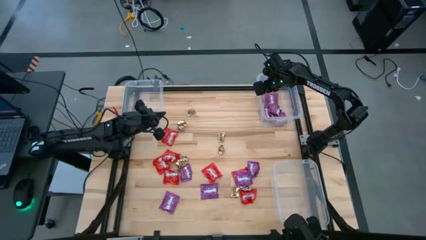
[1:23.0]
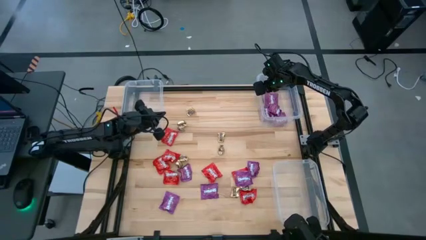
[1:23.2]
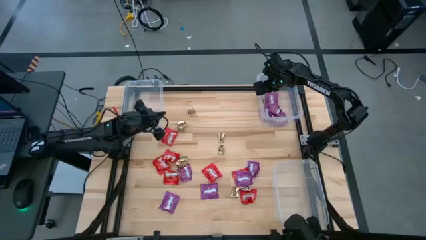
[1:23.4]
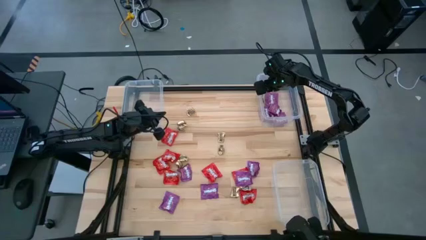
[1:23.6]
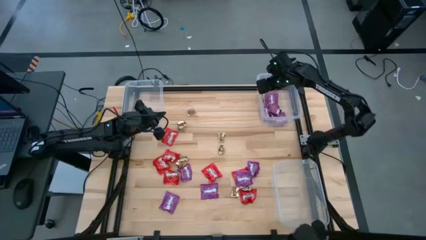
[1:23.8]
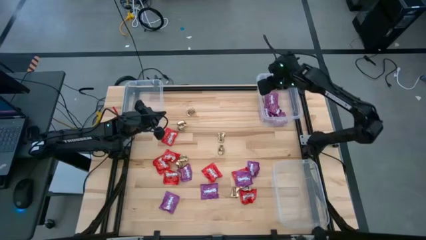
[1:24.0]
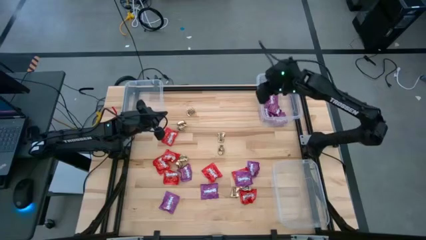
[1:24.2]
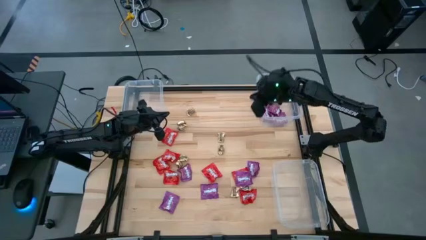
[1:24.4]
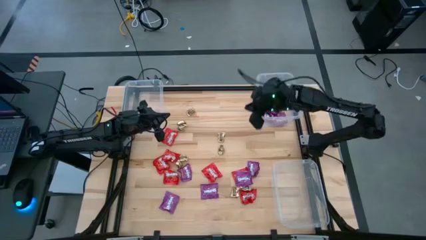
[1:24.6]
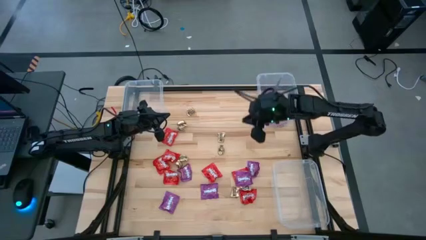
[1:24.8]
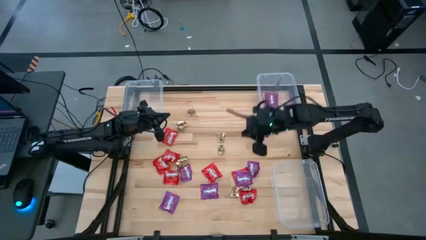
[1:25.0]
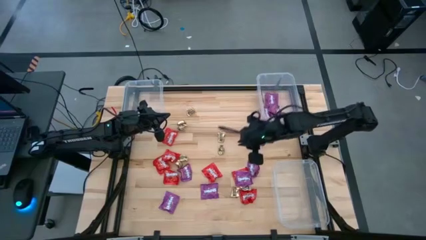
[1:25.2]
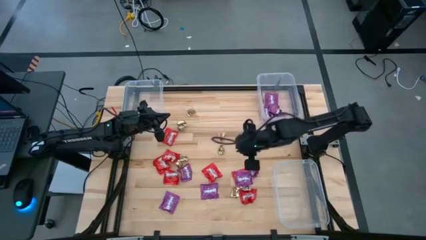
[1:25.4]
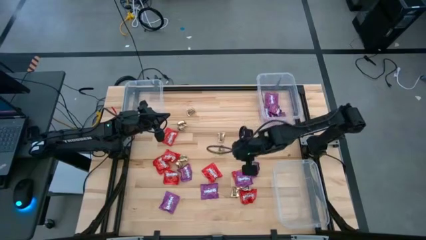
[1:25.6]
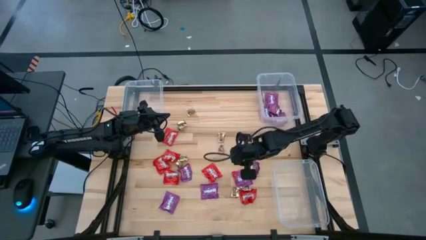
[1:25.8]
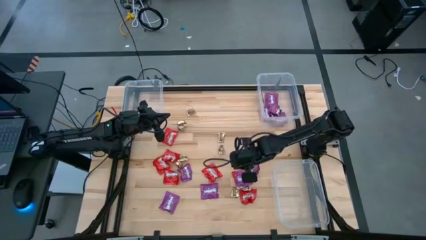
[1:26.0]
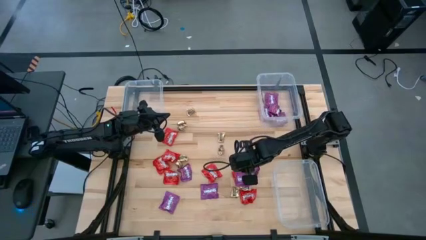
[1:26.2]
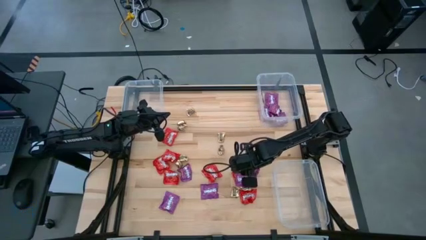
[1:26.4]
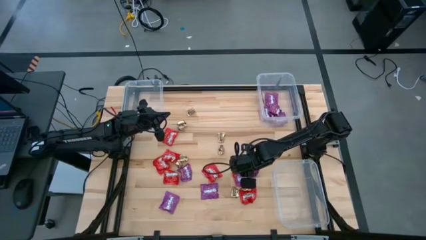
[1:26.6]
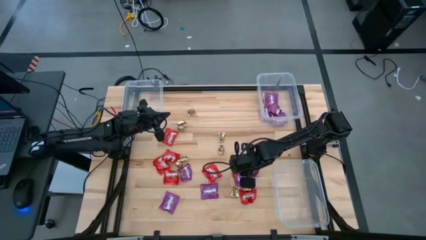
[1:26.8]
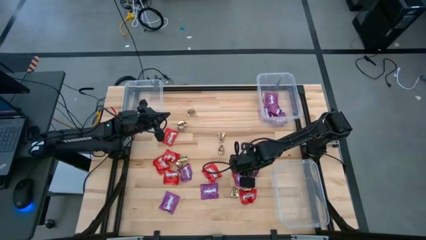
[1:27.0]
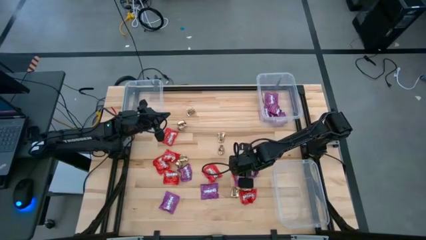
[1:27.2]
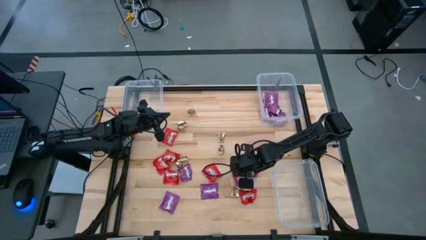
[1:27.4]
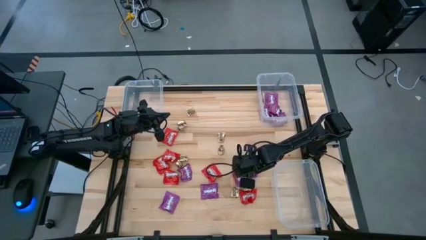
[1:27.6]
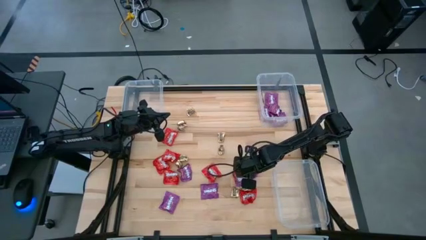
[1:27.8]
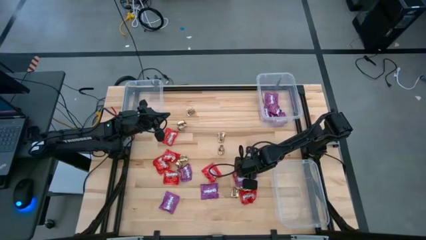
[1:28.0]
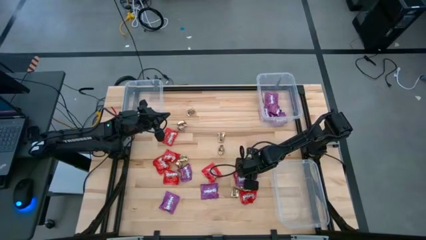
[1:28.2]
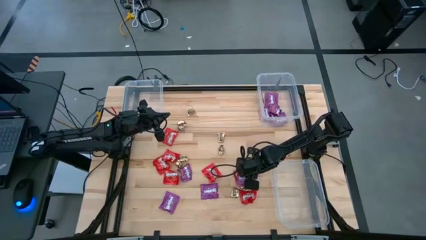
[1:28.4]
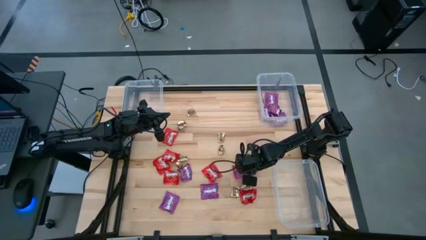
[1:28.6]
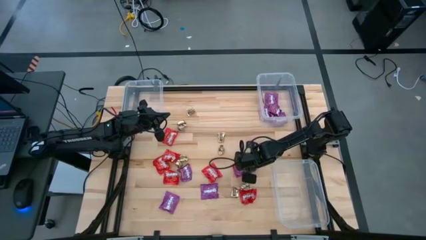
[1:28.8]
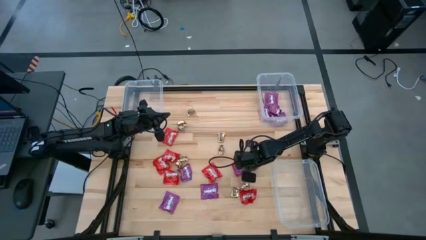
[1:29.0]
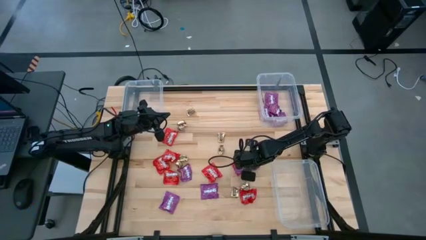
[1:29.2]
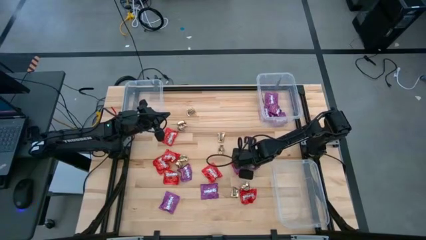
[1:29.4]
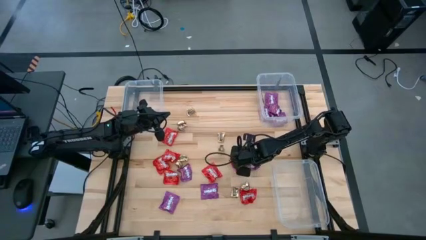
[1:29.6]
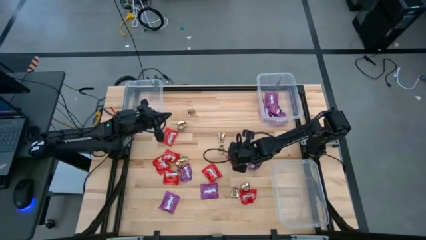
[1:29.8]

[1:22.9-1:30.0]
Task: Sort candy
Put the purple candy into the top right transparent bin

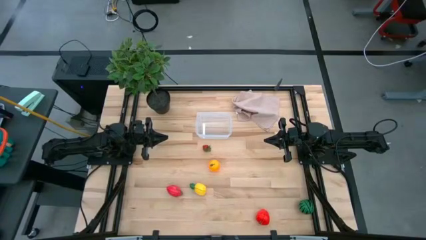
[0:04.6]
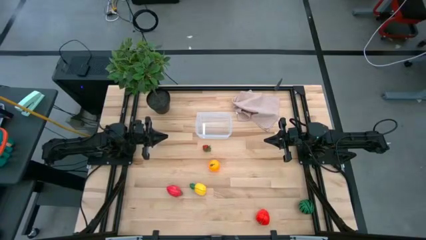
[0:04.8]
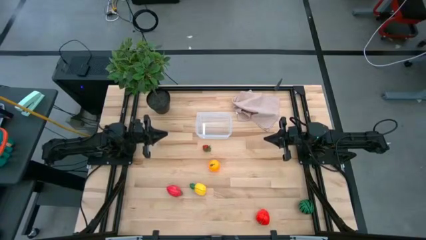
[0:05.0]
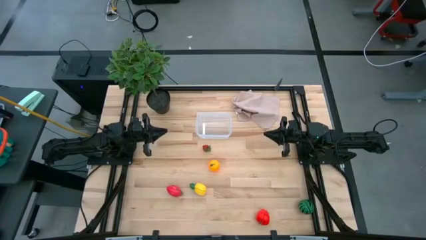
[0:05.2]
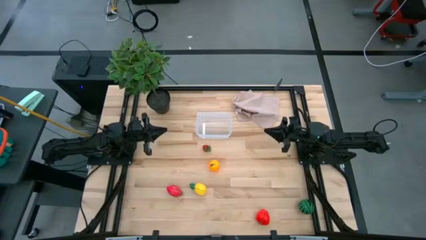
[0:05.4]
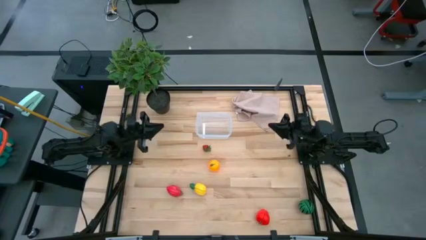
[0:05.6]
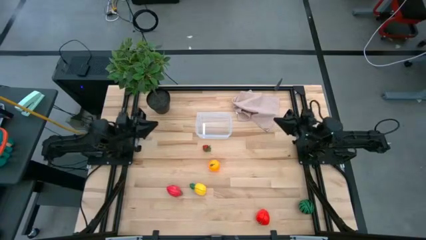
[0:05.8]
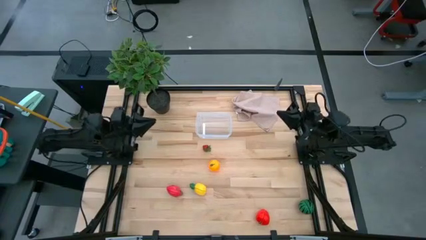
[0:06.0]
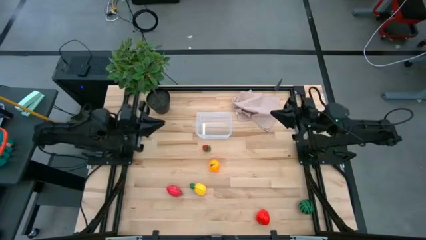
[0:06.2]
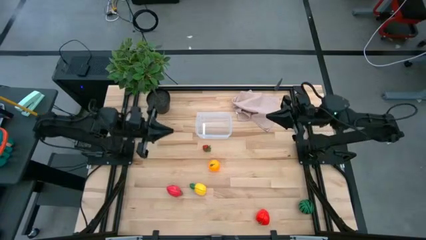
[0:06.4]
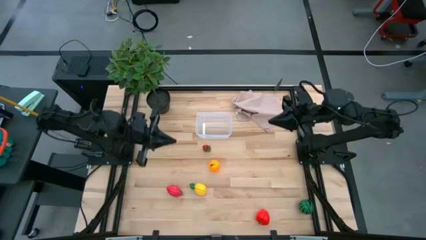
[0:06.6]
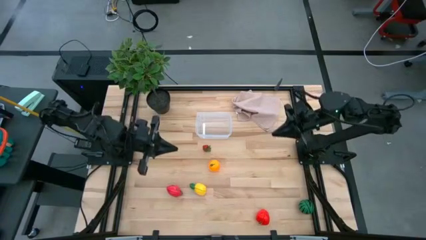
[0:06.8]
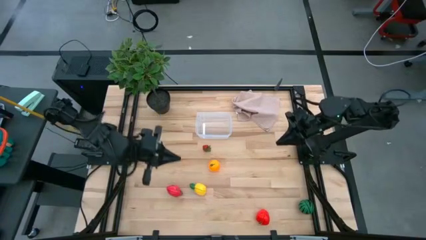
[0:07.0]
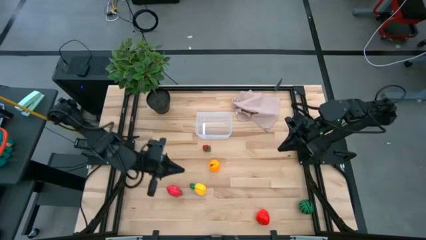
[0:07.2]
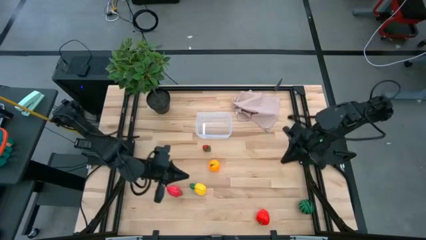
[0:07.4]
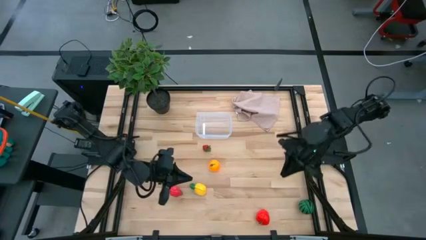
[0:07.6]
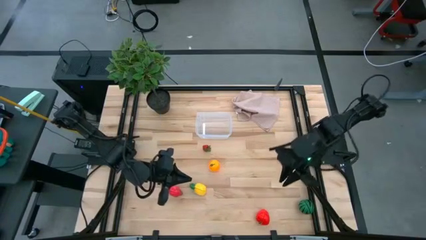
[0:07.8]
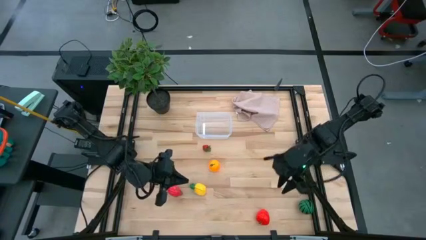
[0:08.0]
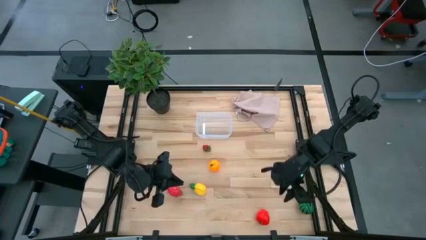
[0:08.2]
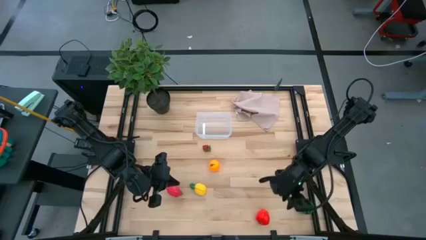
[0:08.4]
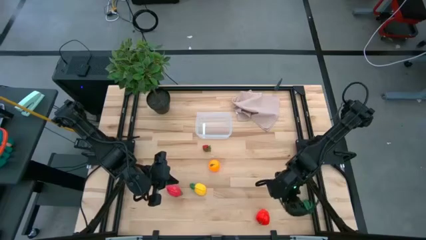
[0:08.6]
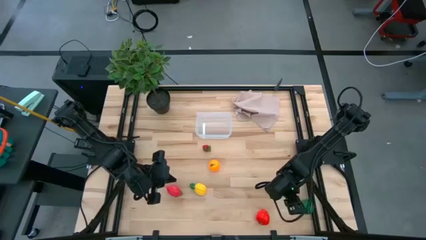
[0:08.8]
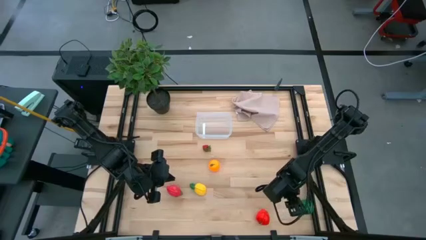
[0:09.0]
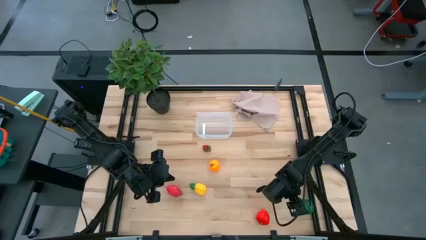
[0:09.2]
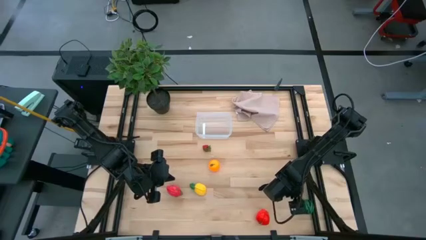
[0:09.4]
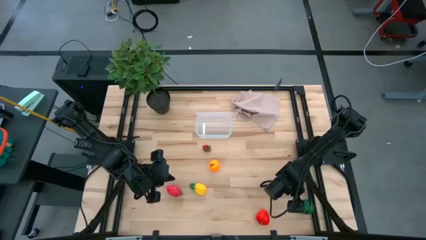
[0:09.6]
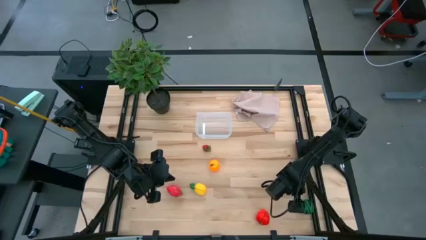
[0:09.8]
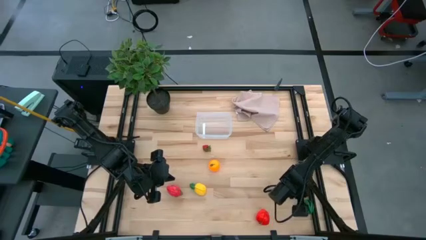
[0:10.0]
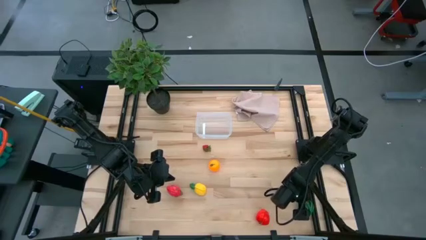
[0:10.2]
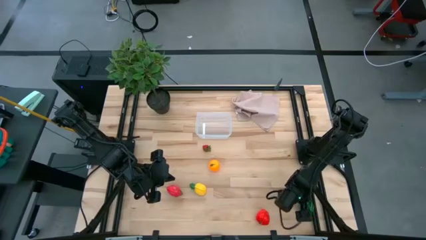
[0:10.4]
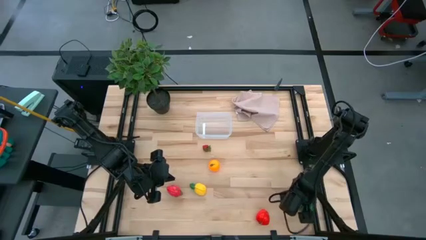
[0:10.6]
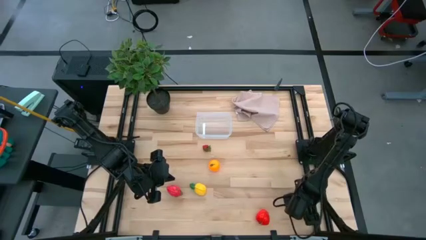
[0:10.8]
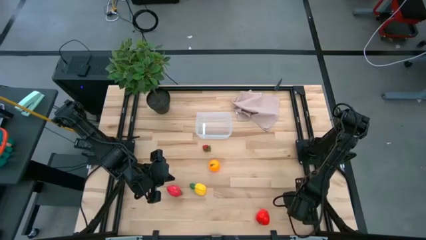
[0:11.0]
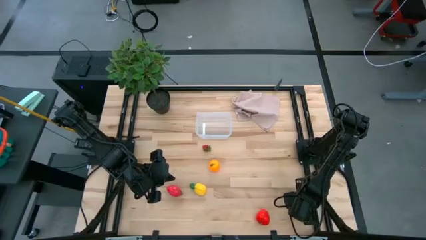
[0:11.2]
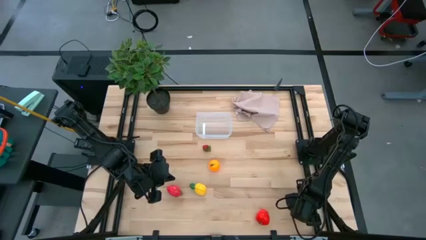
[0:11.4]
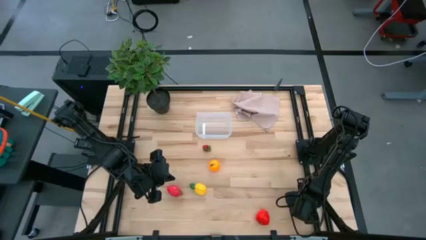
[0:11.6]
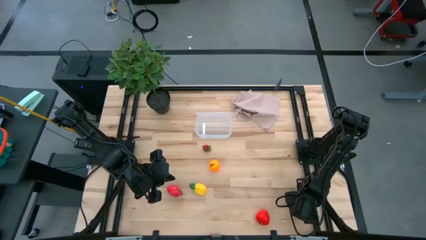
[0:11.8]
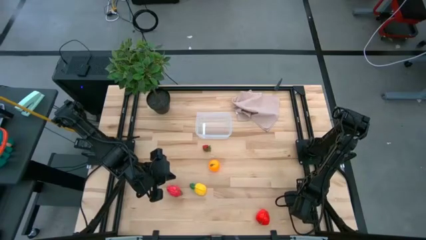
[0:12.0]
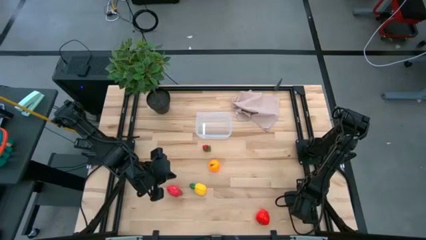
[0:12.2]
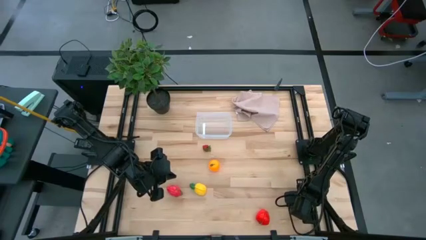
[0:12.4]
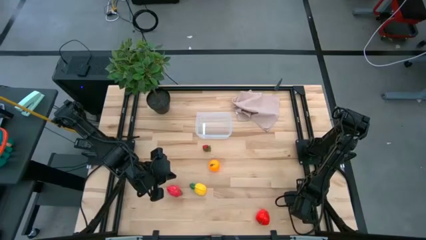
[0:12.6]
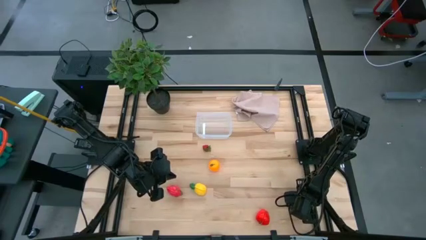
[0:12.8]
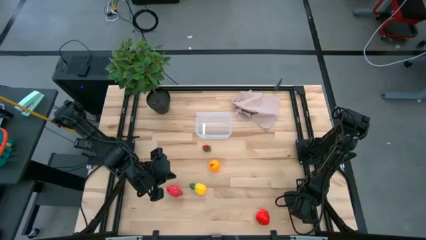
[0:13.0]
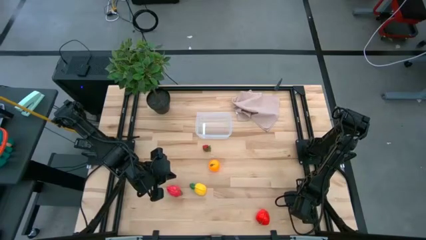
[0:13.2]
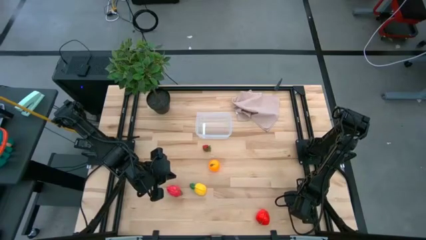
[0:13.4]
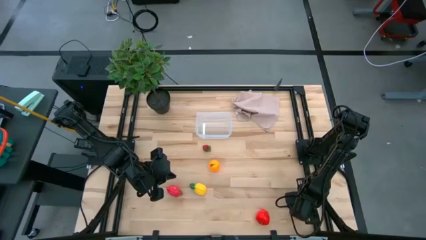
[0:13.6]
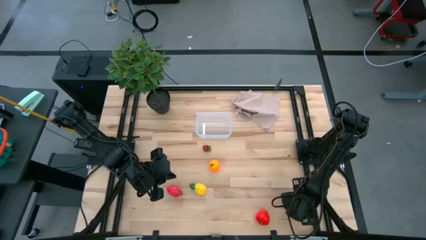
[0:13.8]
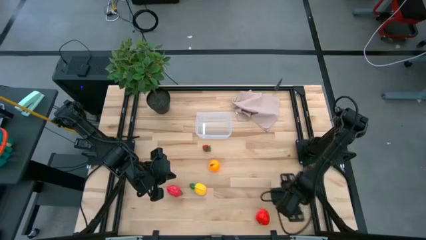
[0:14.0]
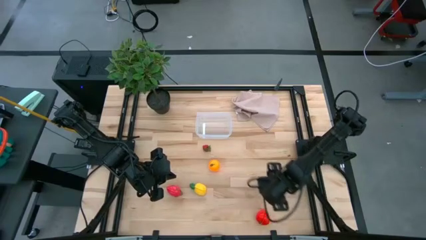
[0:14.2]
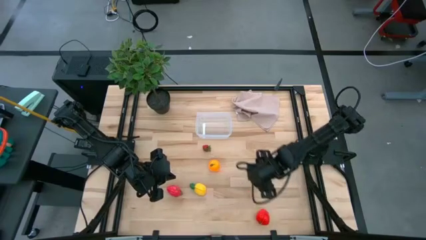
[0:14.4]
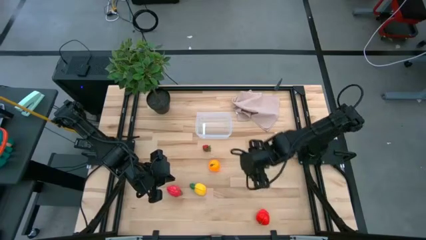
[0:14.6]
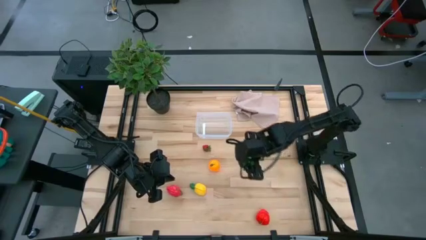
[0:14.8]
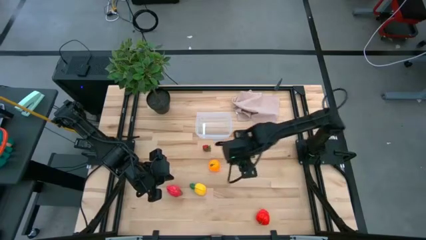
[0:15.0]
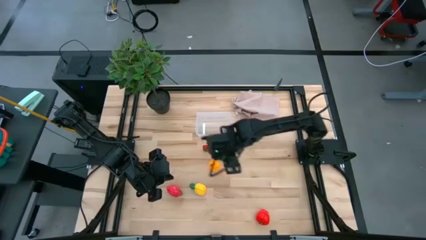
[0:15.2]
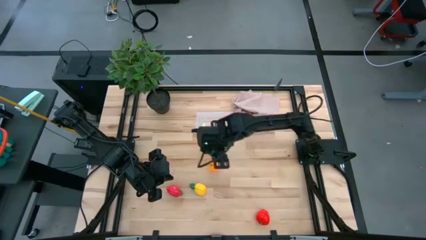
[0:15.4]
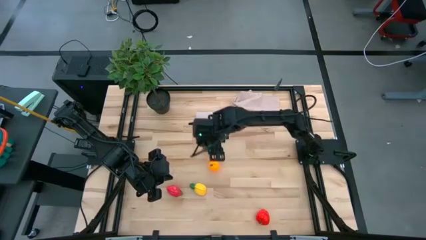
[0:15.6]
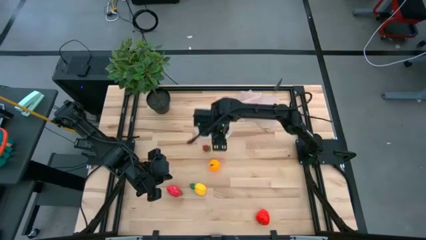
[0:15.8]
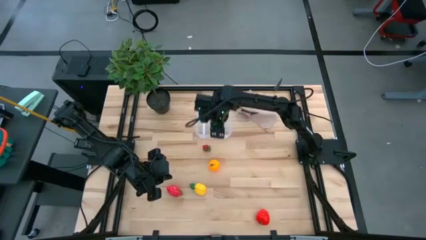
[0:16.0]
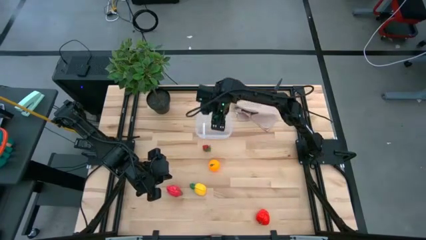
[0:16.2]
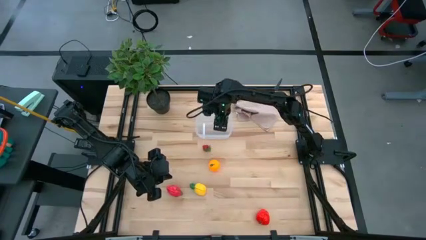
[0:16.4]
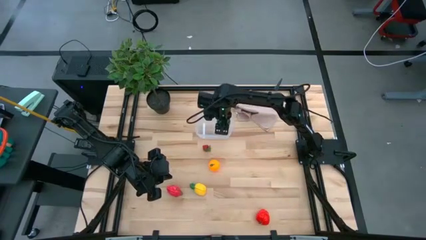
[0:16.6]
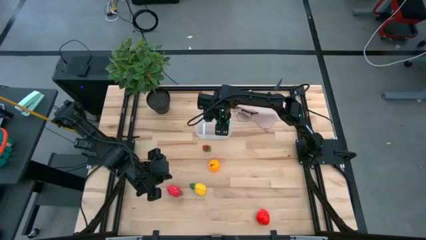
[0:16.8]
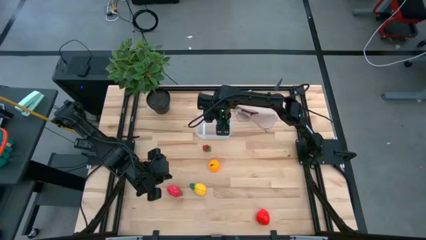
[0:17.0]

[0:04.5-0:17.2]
Task: Pick and placing Produce into tupperware
Put the green watermelon into the transparent container
